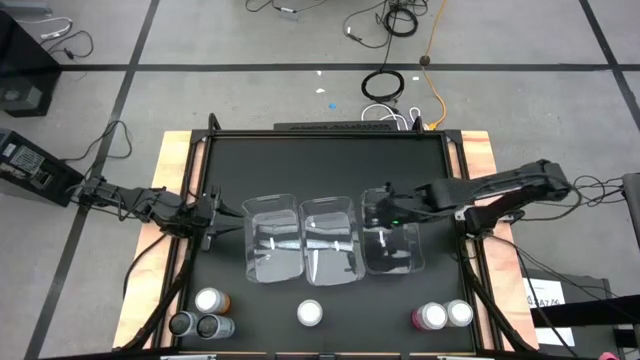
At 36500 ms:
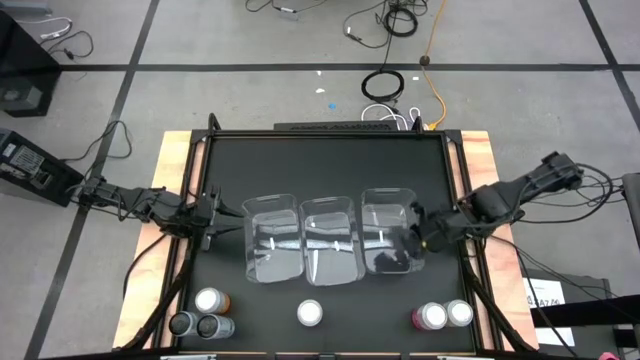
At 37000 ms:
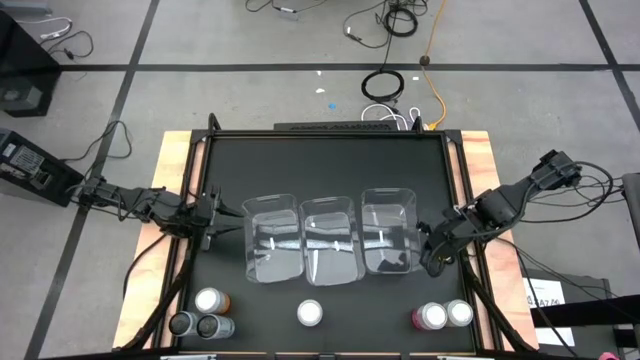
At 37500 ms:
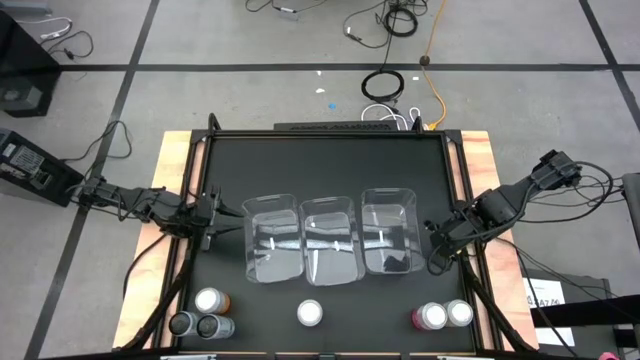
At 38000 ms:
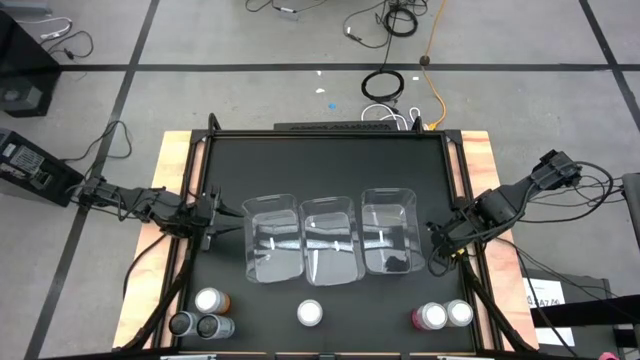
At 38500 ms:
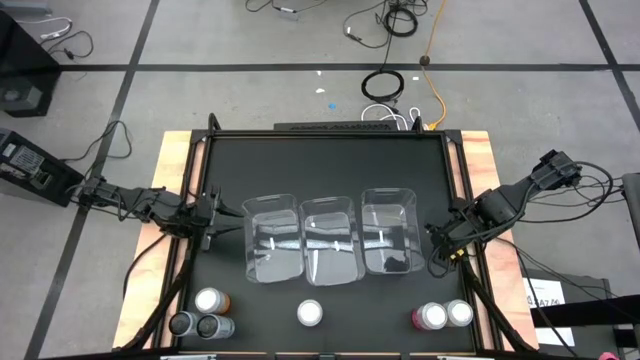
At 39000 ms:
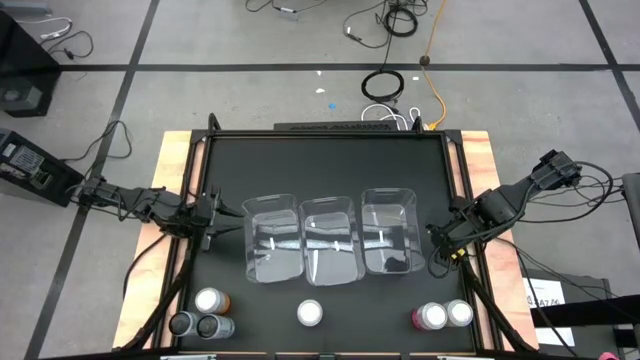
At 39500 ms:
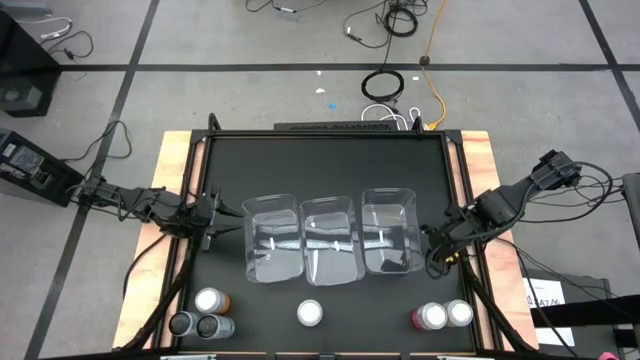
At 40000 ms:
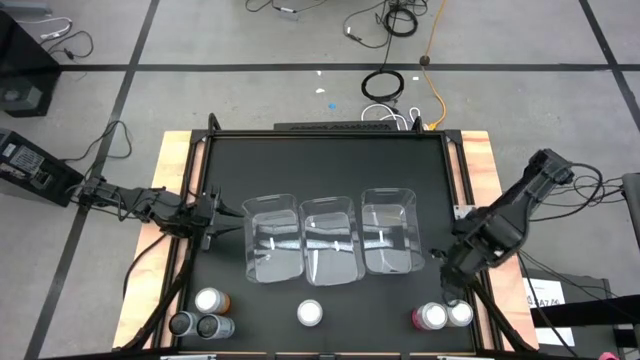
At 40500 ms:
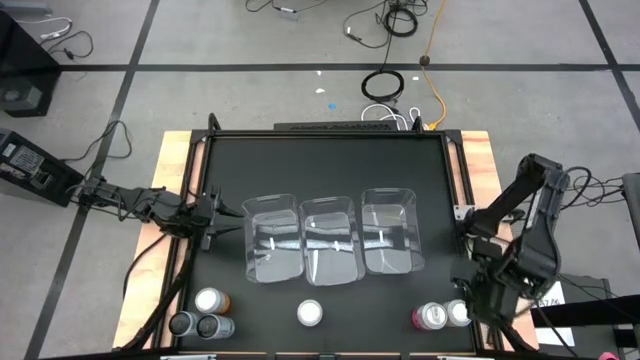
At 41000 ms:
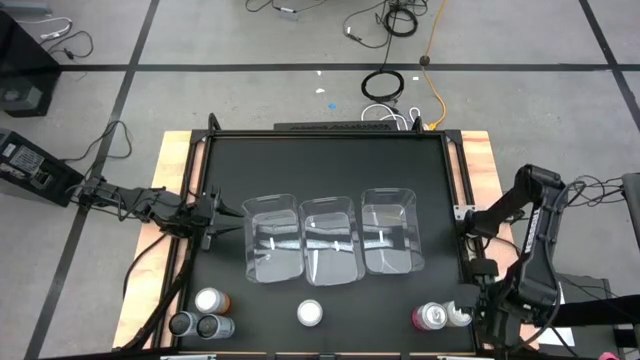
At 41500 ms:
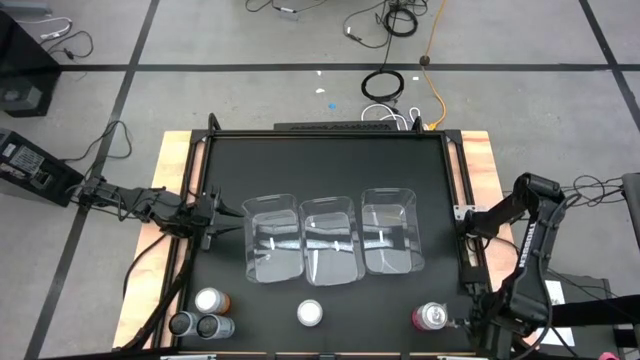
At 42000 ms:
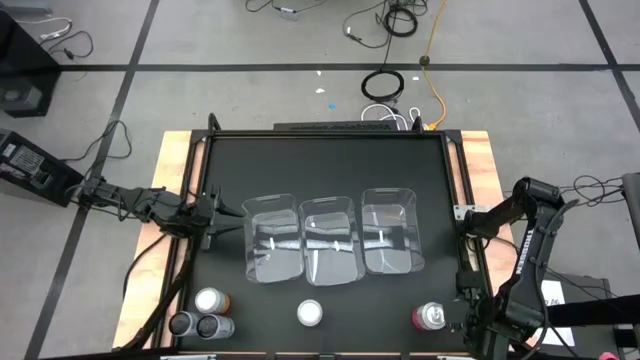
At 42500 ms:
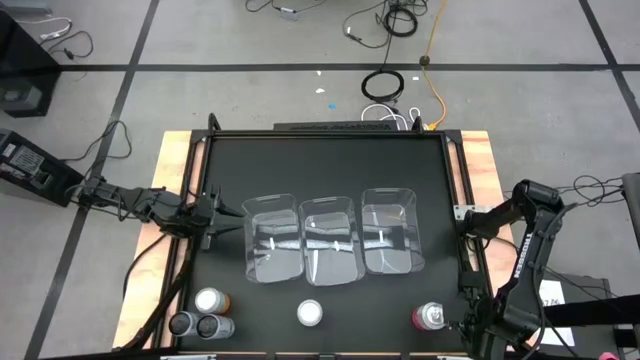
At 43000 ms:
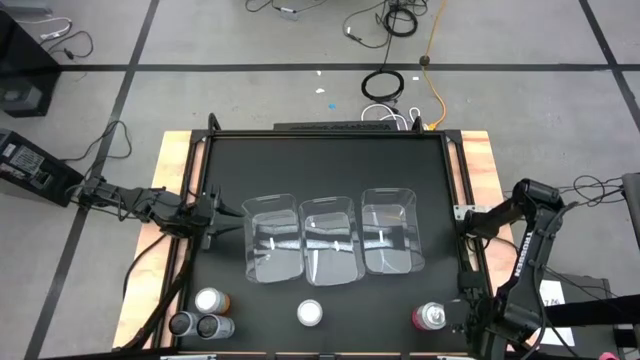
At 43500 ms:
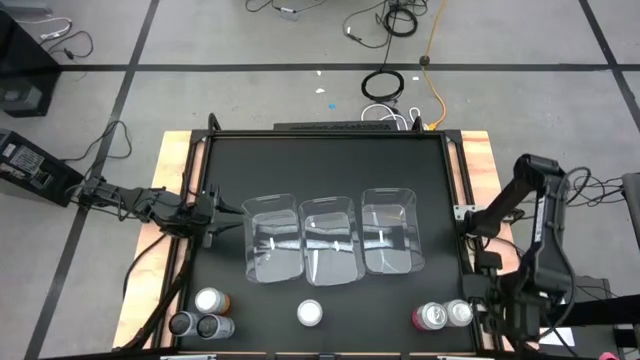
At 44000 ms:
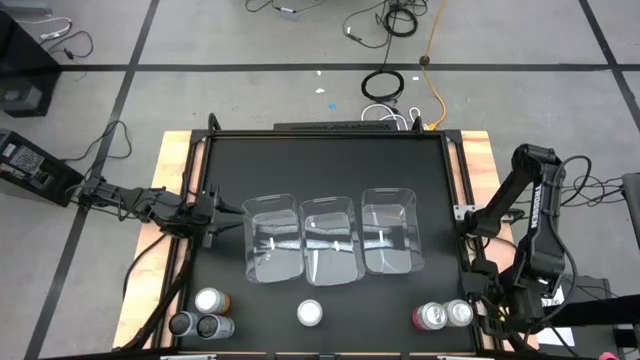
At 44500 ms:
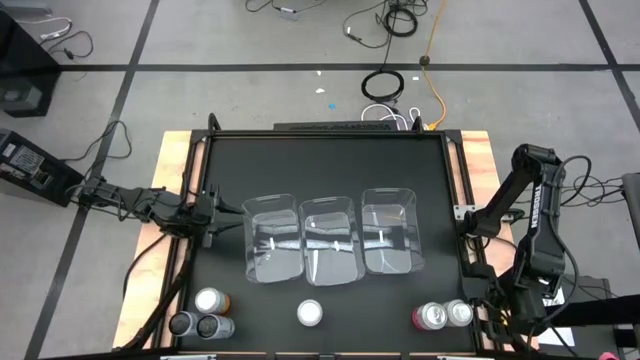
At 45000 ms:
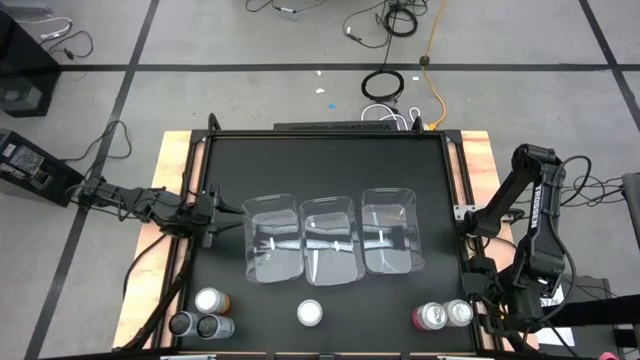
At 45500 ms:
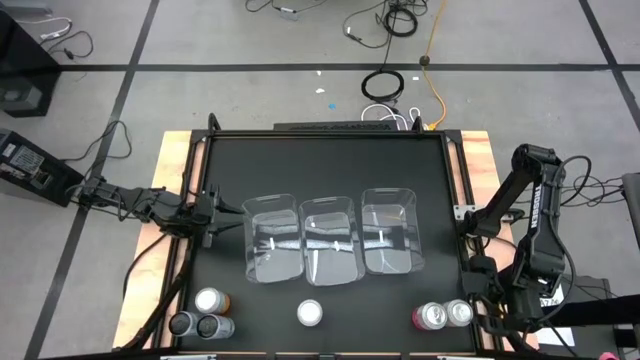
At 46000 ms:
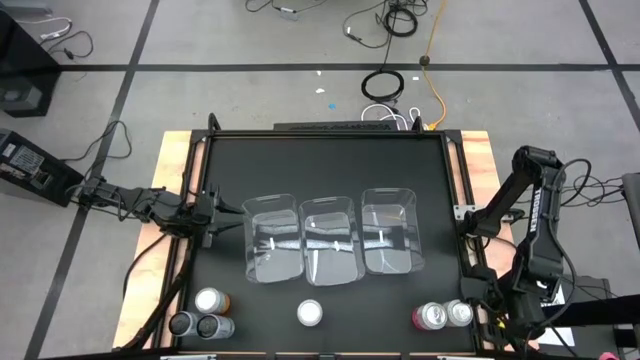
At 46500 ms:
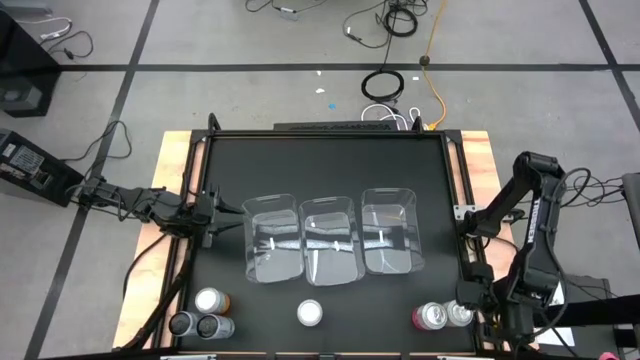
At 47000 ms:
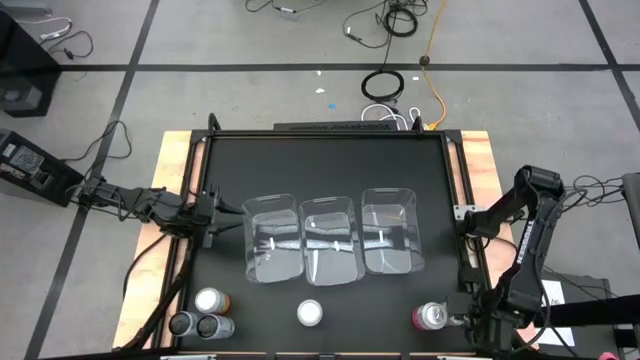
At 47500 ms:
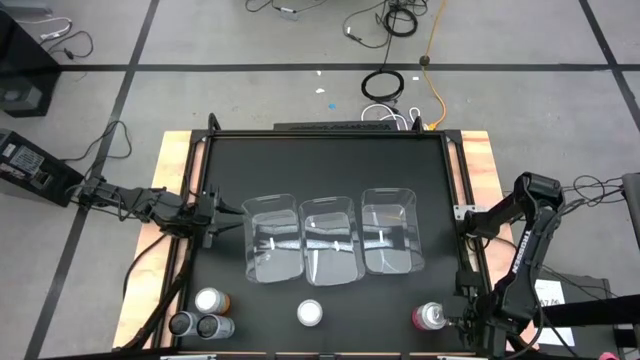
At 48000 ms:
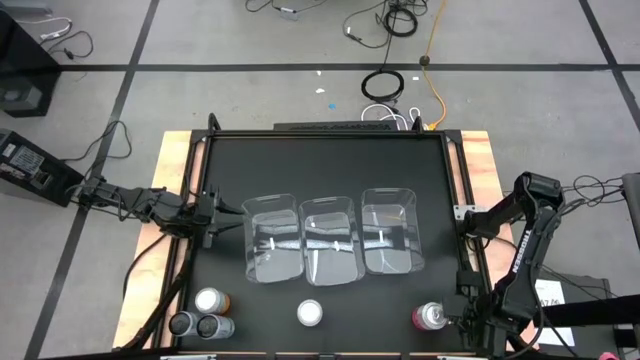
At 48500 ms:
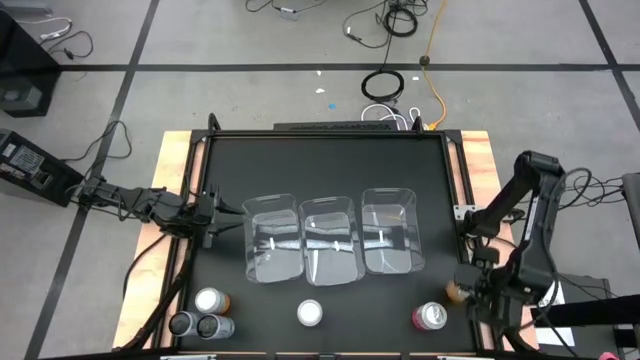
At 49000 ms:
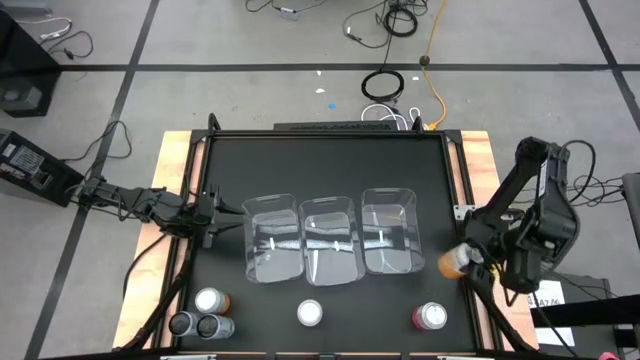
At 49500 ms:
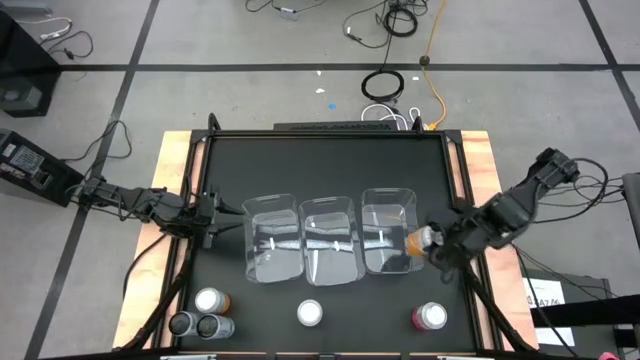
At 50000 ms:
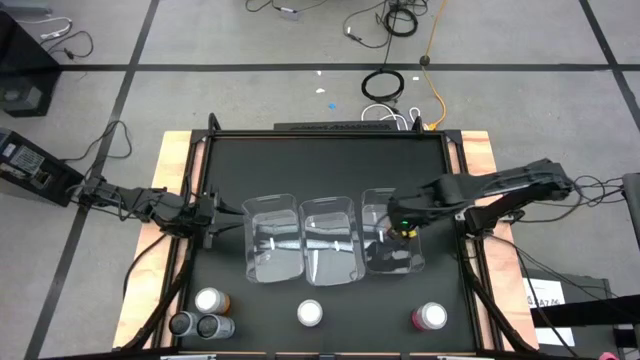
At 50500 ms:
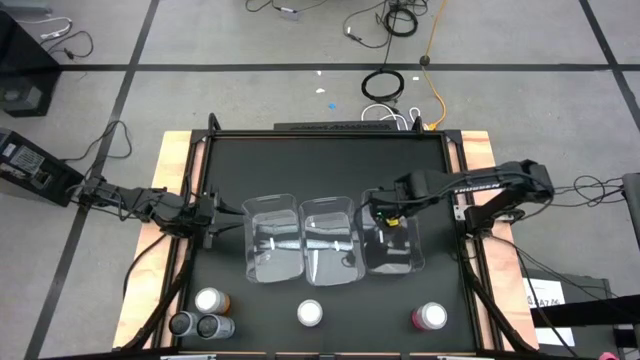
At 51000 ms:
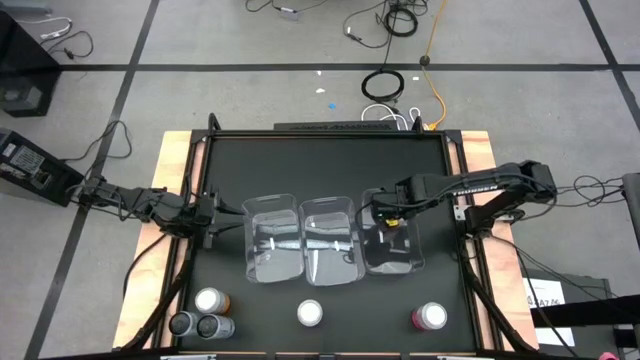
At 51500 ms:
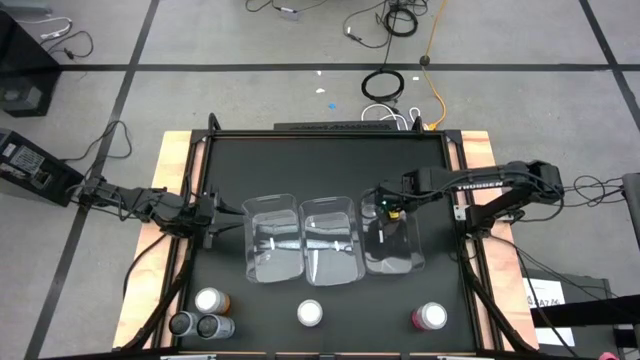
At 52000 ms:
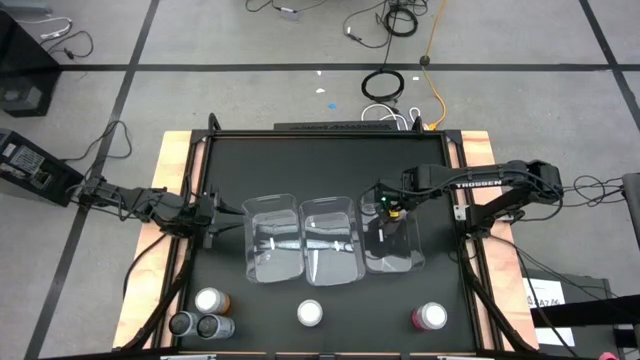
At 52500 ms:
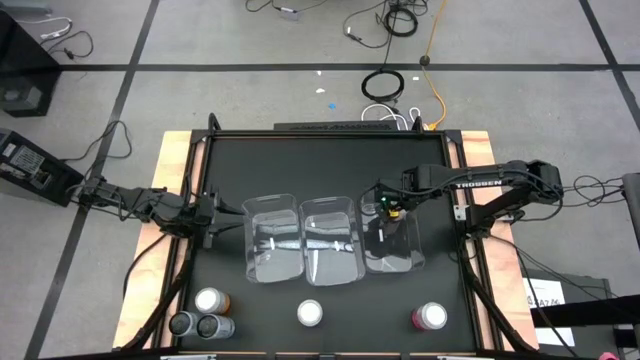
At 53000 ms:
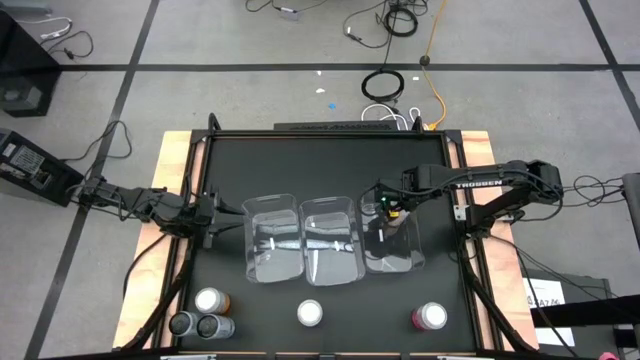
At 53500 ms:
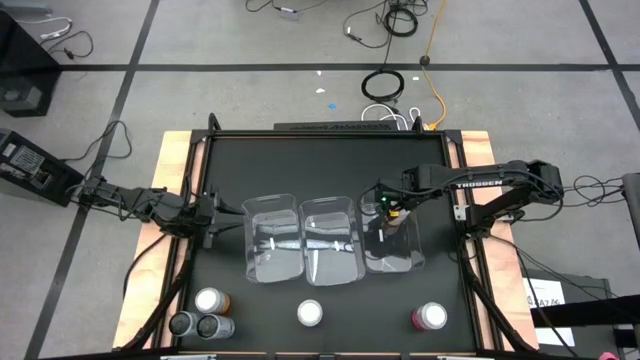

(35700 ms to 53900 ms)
Task: Sort soda cans
Put the right orange soda can into the right transparent bin

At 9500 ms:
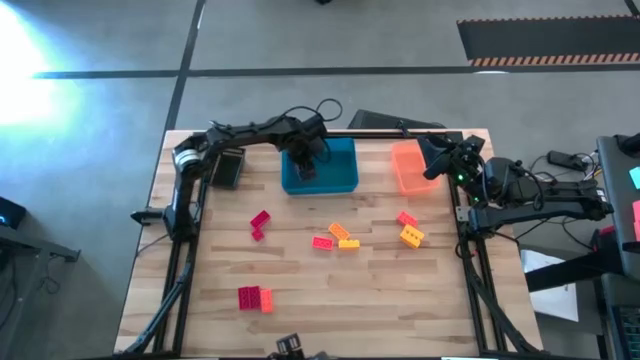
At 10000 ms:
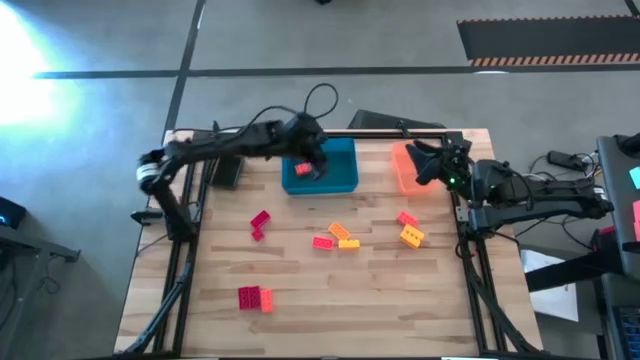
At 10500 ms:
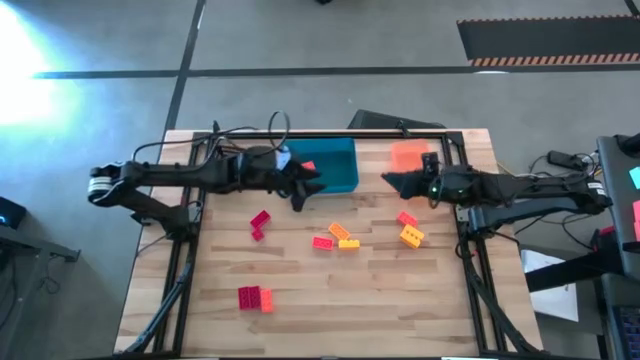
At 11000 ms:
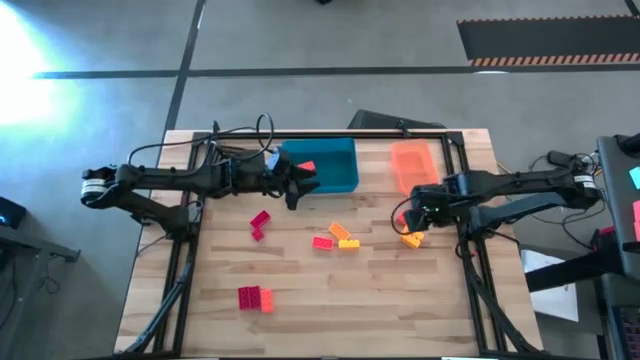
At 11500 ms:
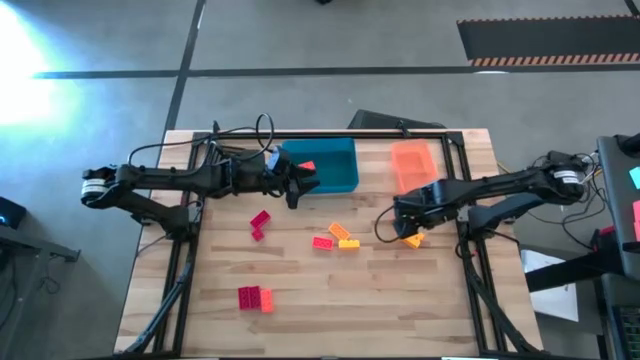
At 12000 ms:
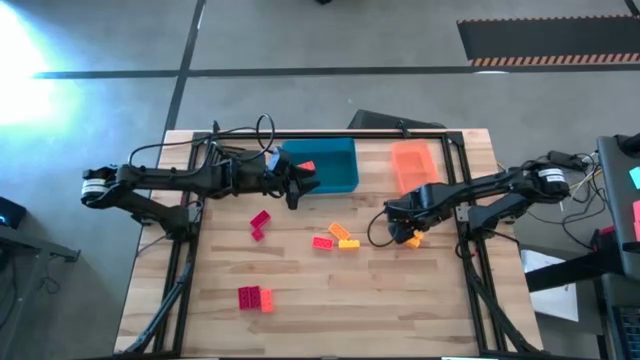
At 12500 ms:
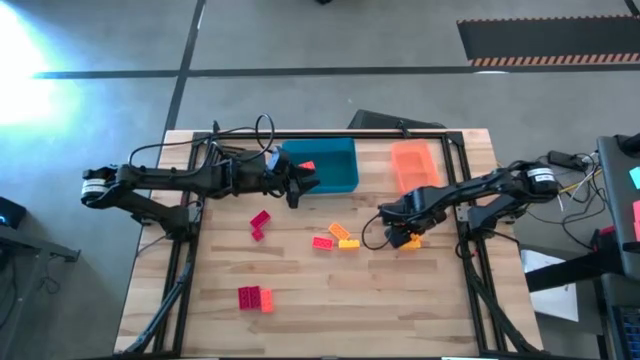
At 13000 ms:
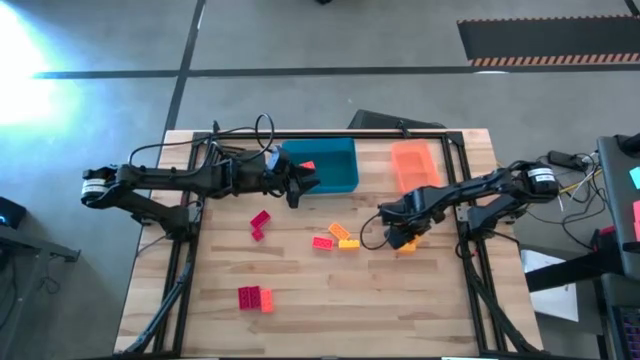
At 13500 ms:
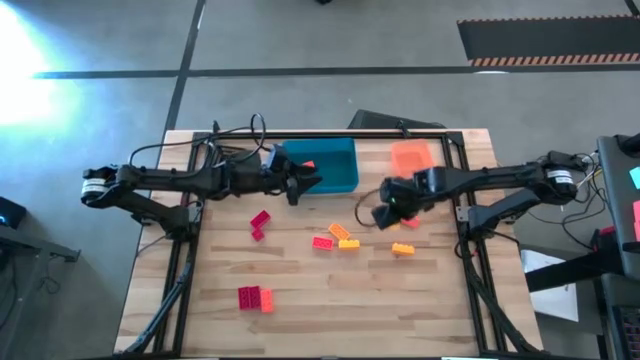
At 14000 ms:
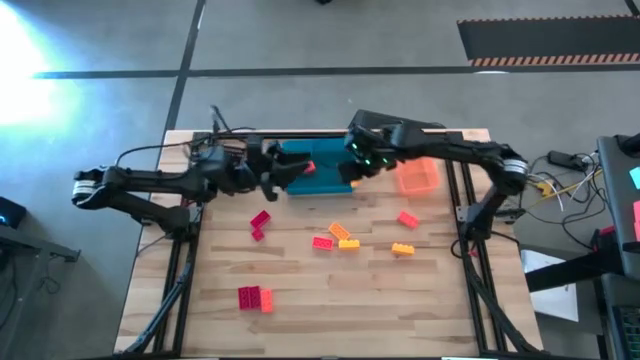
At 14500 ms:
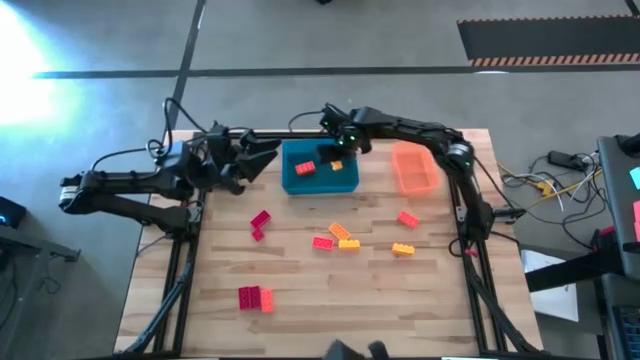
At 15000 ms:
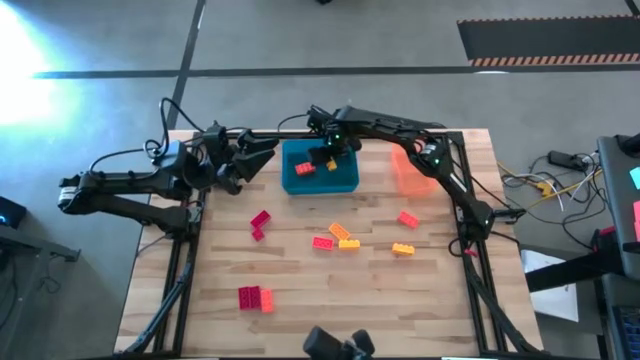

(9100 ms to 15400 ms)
Task: Sort & place blocks by color
Put the yellow game piece into the blue bin
